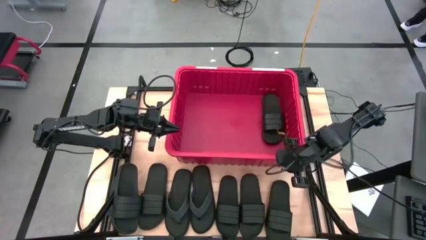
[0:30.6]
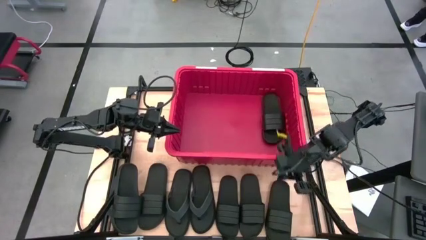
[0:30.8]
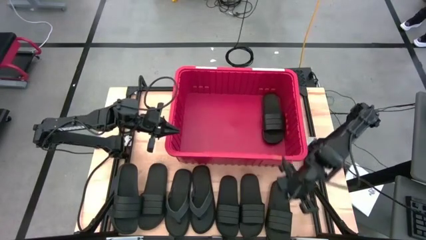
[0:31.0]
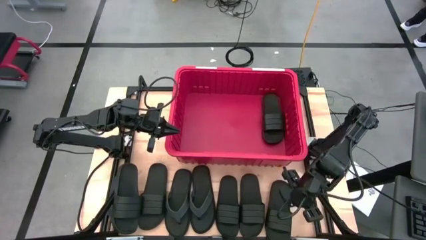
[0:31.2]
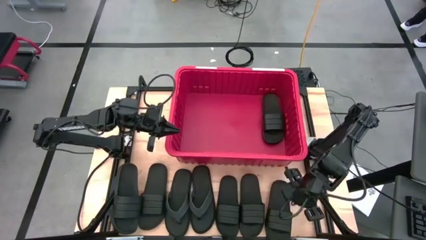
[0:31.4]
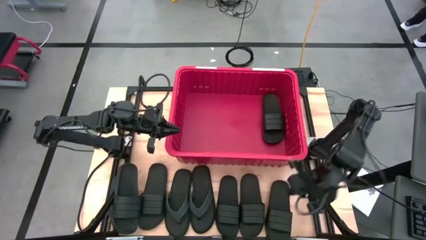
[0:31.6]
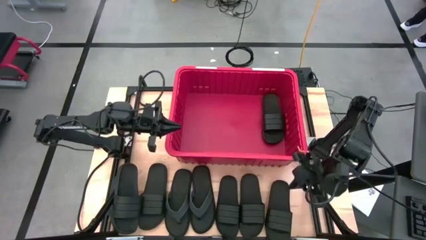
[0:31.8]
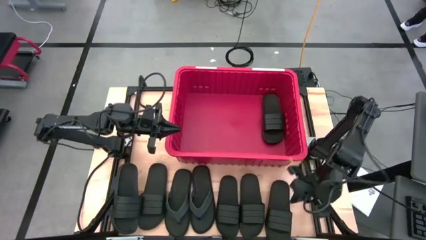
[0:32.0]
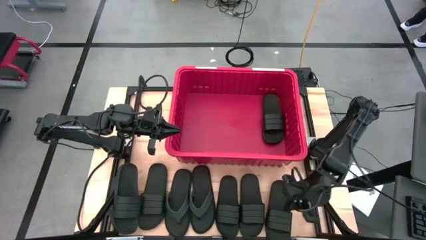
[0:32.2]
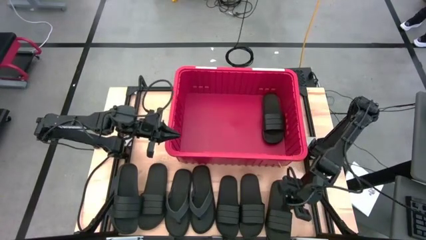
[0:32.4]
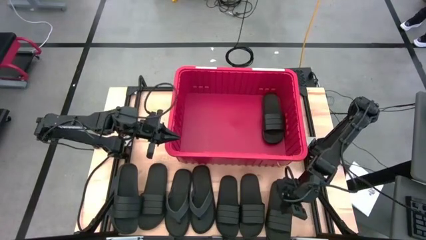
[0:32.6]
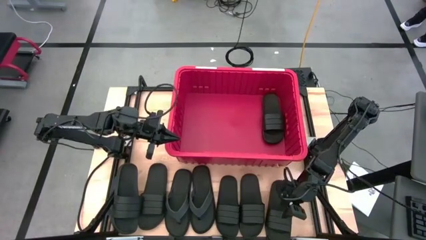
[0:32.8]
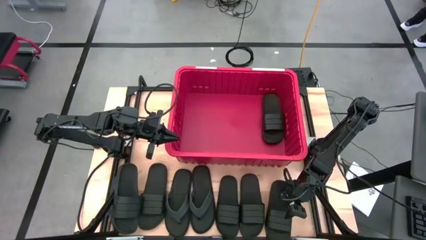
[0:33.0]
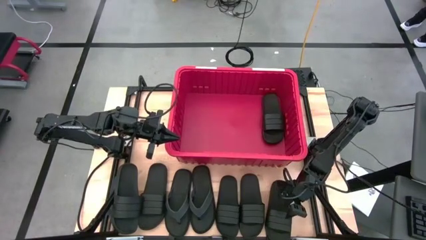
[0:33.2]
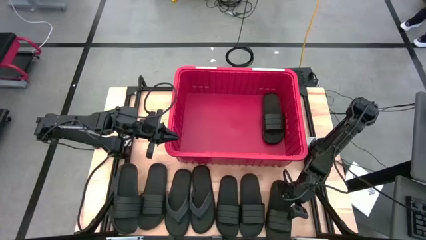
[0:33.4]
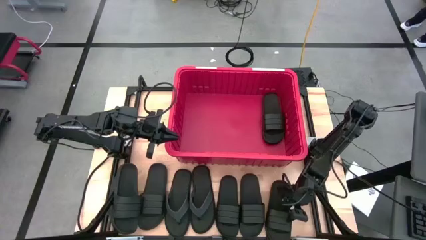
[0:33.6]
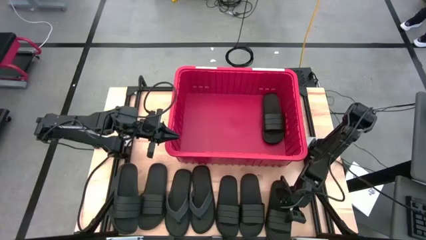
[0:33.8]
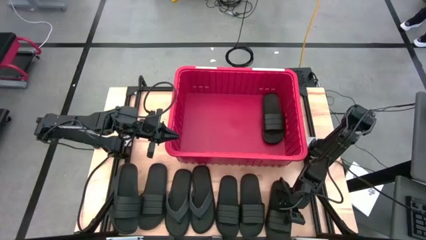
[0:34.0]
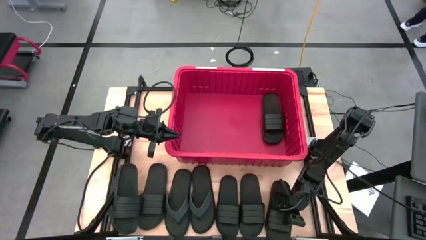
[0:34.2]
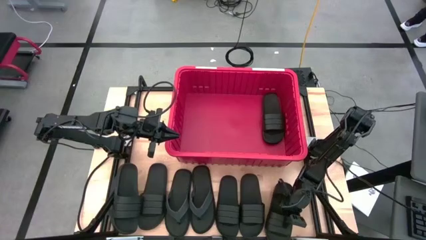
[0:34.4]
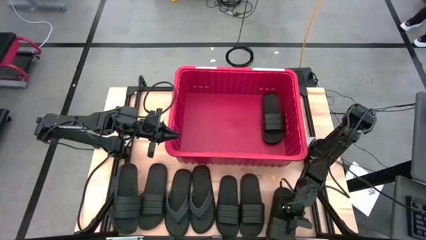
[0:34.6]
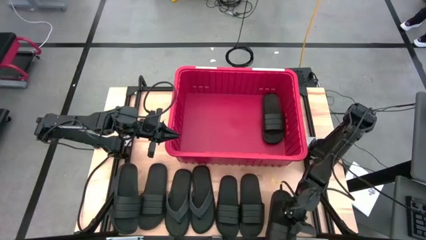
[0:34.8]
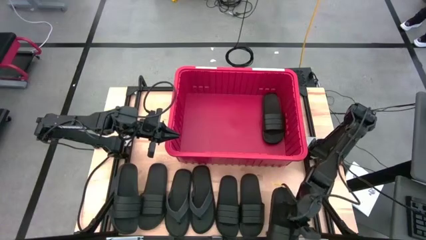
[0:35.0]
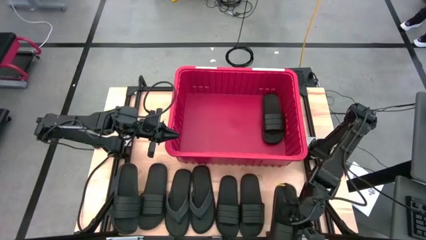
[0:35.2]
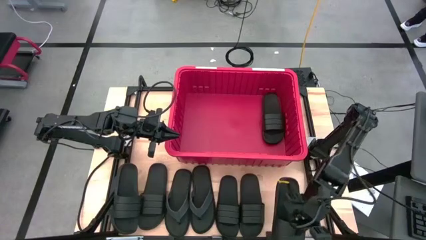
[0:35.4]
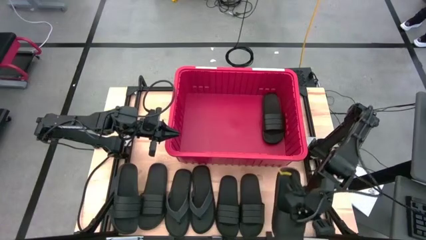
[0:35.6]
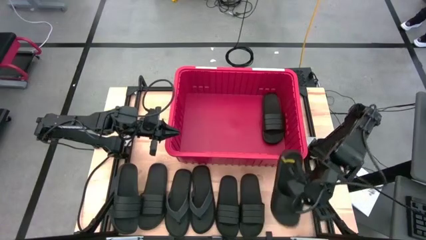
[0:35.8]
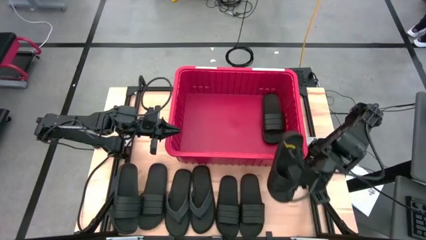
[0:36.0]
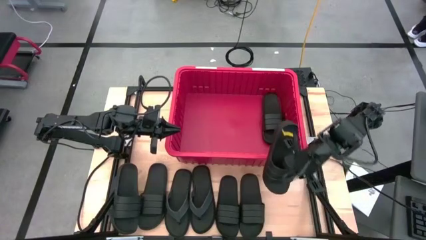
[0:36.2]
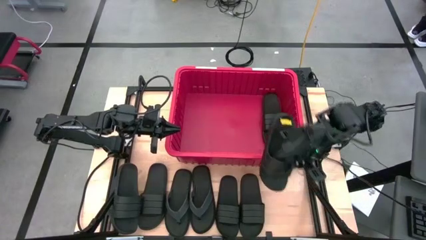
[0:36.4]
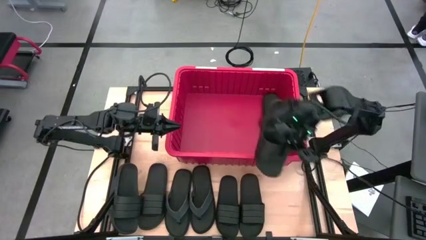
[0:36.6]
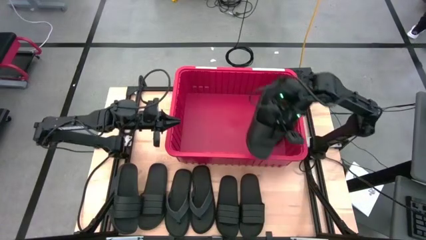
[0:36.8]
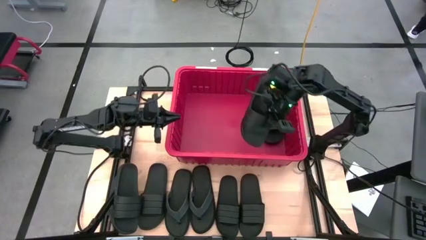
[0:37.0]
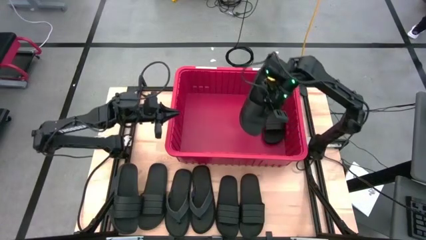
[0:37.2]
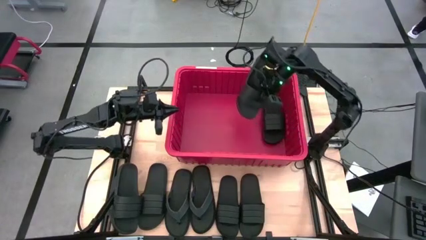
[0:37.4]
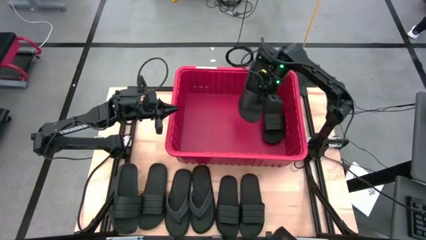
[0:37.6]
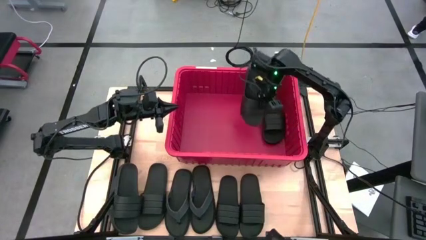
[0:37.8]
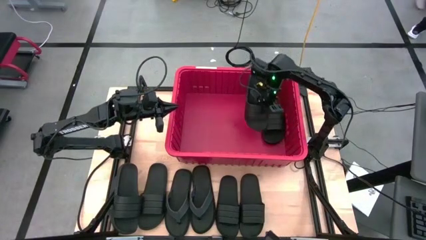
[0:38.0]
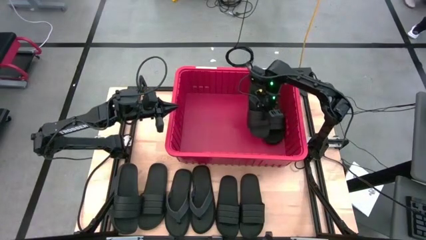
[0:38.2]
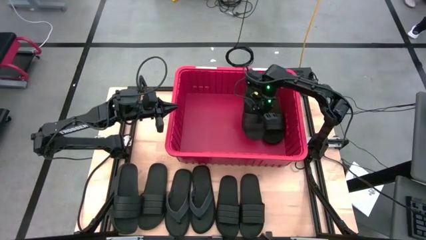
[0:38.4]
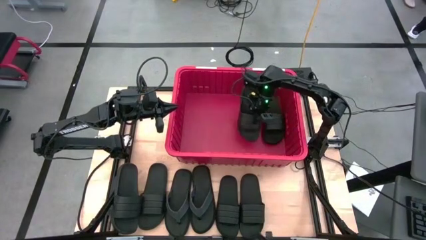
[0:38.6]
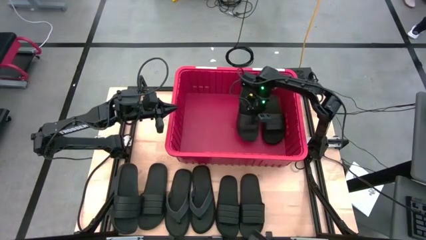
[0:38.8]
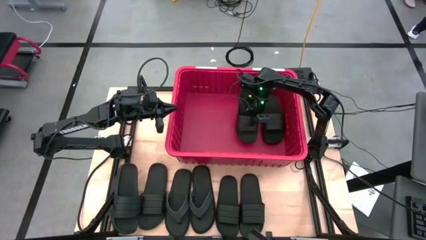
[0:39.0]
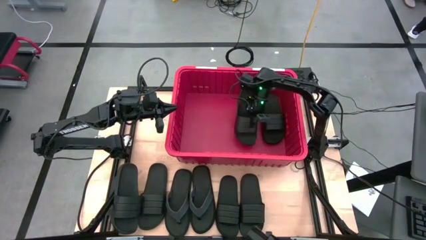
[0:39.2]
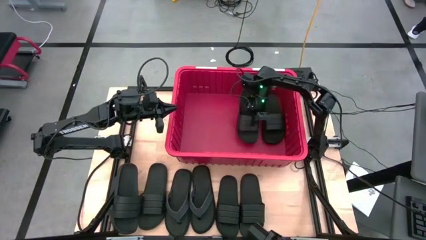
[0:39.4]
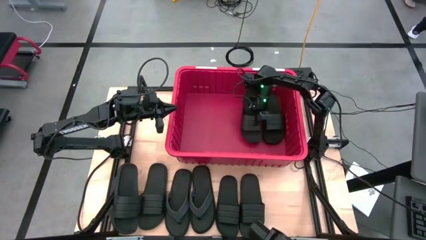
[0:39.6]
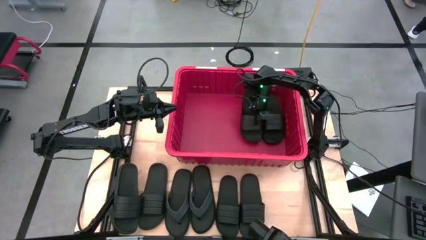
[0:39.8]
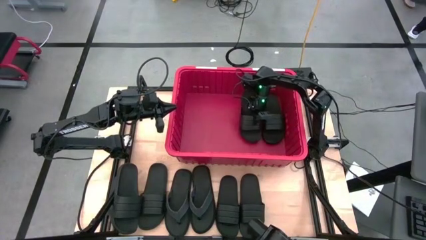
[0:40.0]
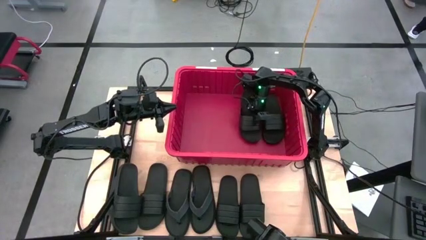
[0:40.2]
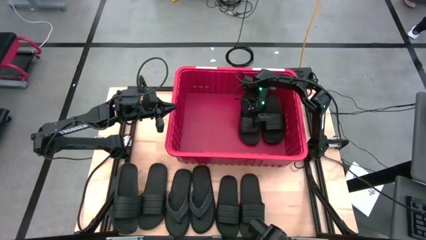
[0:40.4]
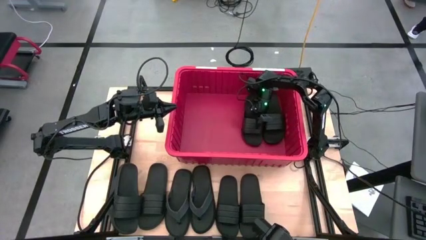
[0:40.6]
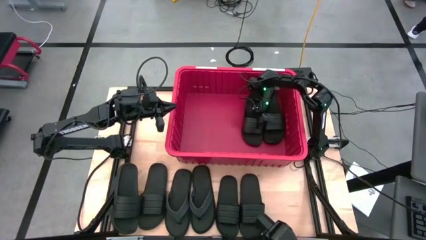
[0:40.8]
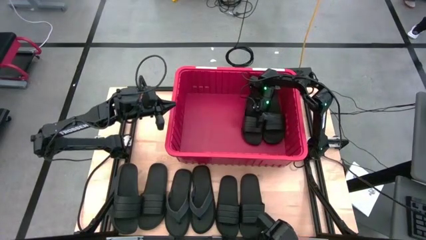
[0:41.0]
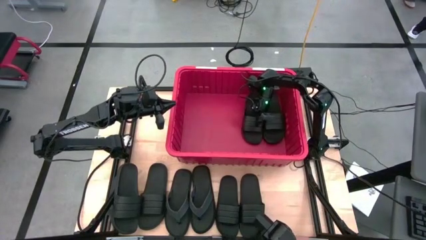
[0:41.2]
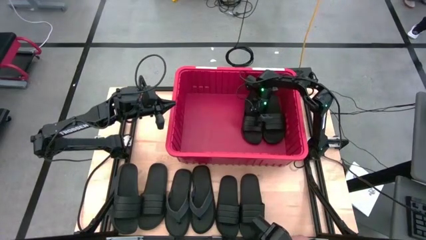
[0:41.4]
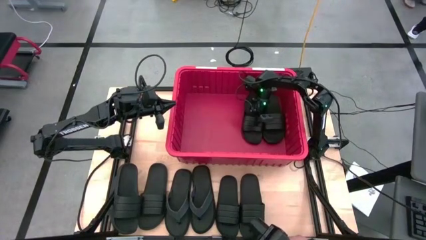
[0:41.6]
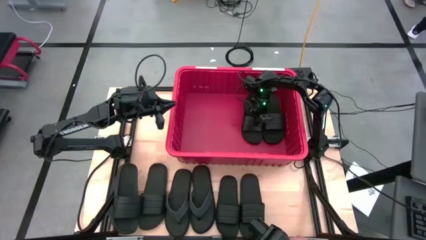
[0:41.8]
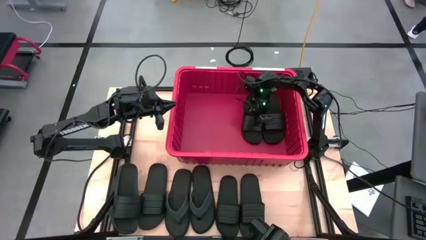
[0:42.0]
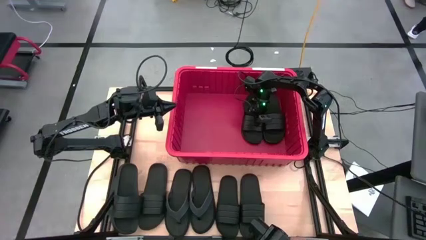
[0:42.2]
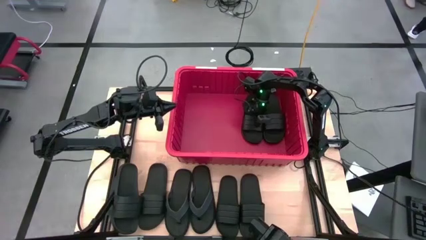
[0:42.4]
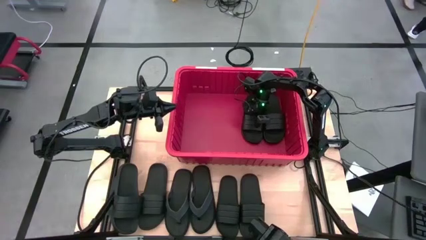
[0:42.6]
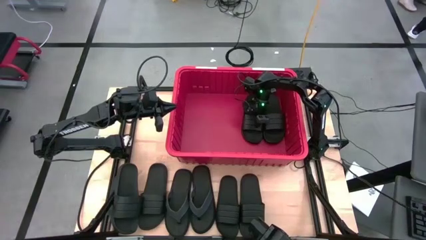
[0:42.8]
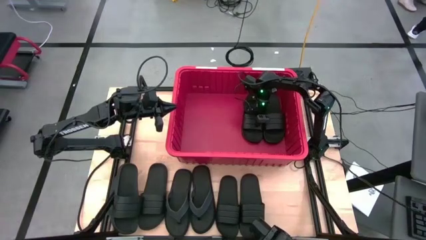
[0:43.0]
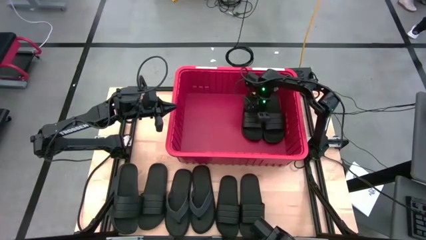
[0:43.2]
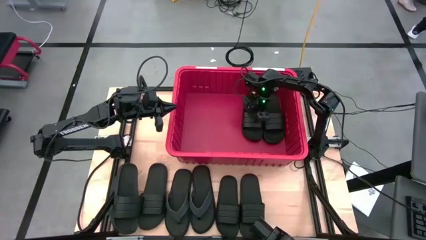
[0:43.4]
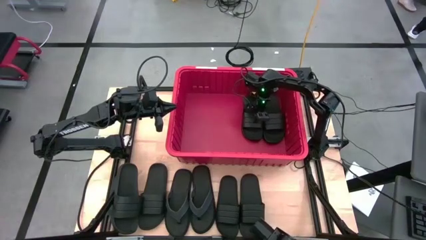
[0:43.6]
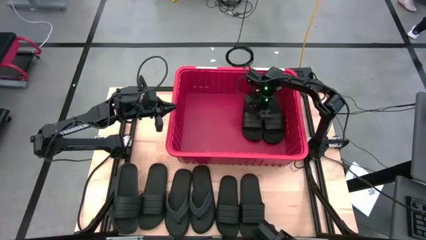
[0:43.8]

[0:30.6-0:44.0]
Task: Pick and place slides into bin
Put the slide into the bin

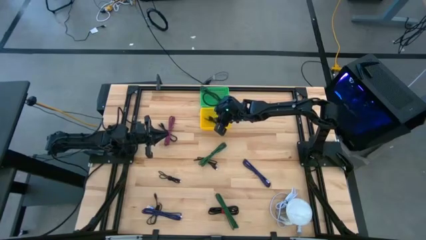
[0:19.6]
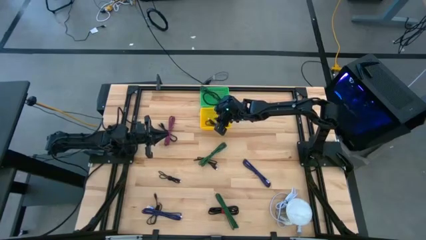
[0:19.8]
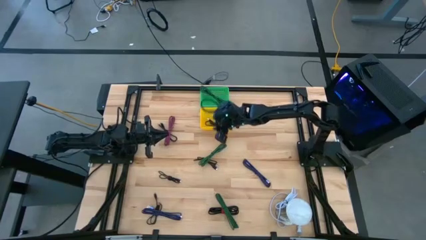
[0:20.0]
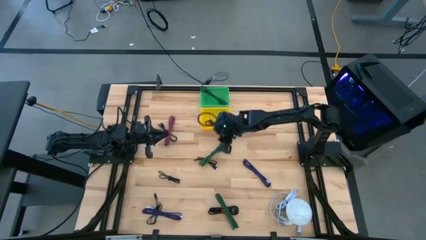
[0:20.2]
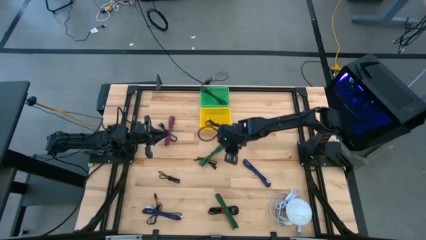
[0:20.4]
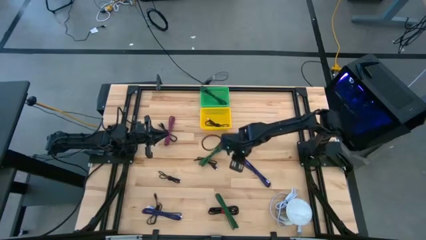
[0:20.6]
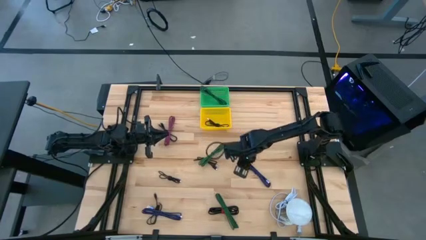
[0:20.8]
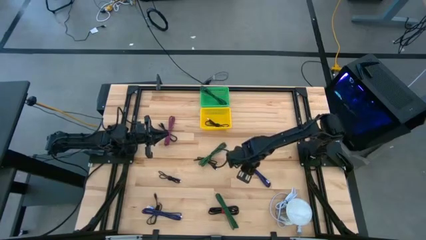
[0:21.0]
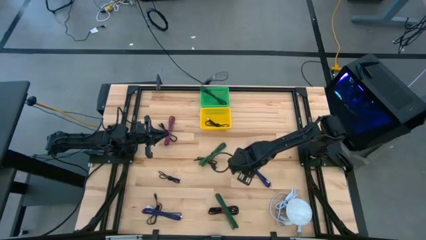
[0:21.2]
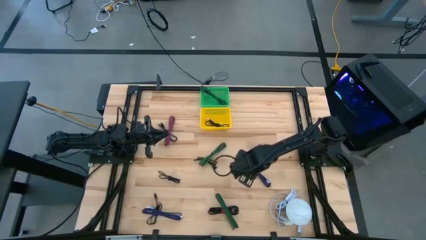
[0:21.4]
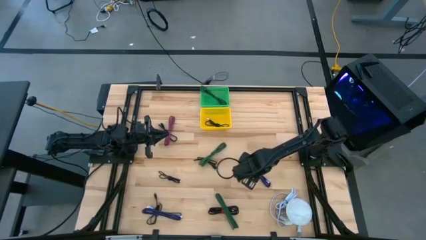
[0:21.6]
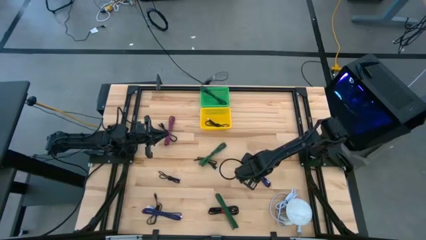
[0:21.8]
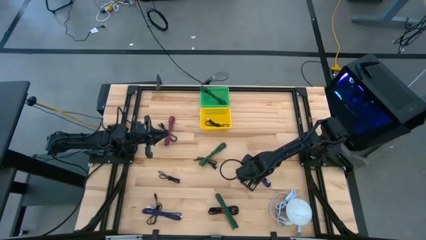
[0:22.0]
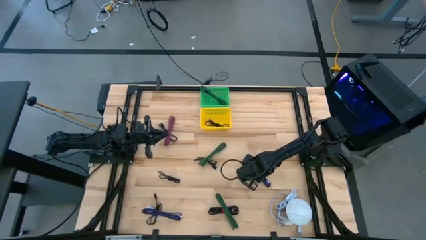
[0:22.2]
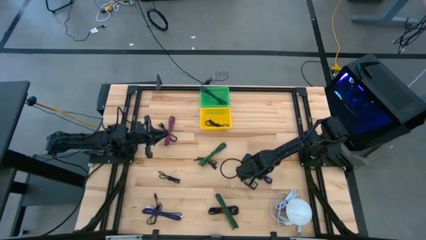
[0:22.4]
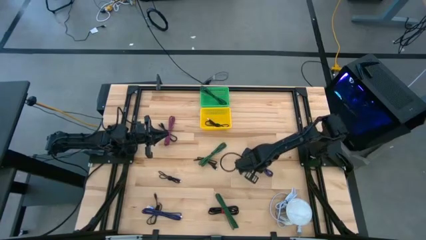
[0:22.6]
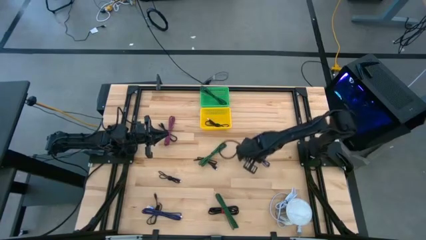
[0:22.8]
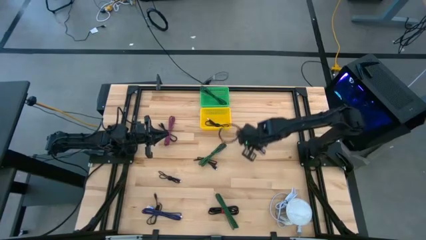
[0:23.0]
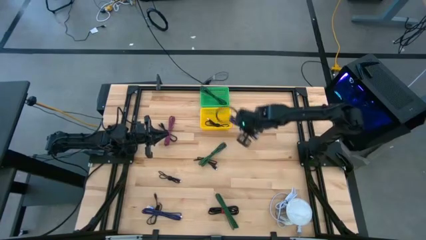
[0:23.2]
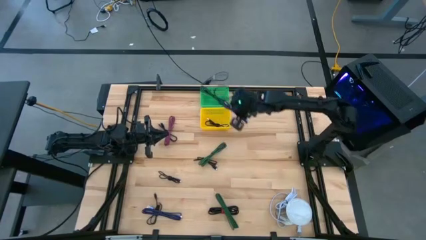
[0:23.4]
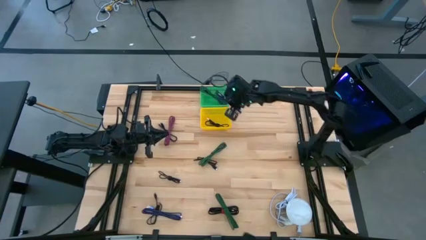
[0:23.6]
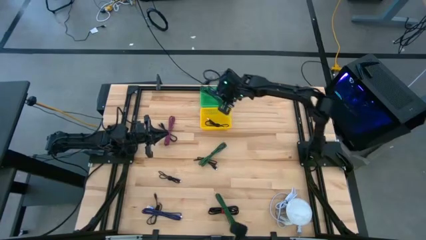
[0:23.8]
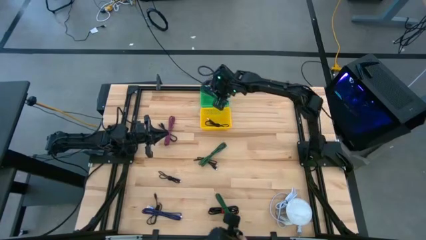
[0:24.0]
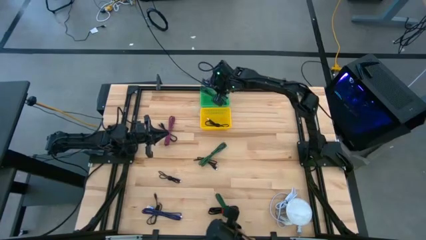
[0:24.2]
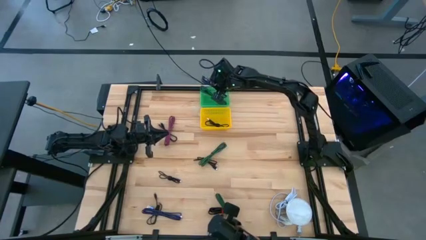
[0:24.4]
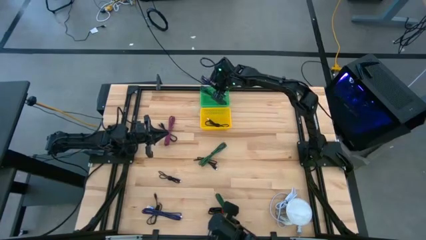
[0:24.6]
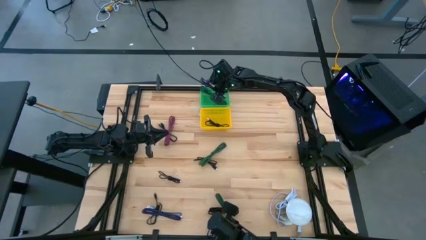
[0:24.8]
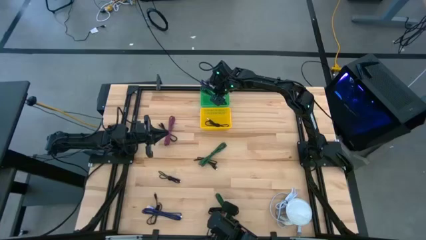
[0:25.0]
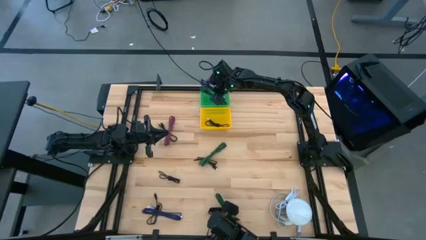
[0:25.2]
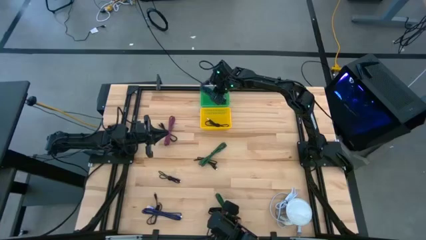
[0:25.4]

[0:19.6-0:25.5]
Task: Pick & Place USB Port
Put the right blue patterned charger cable into the green basket
